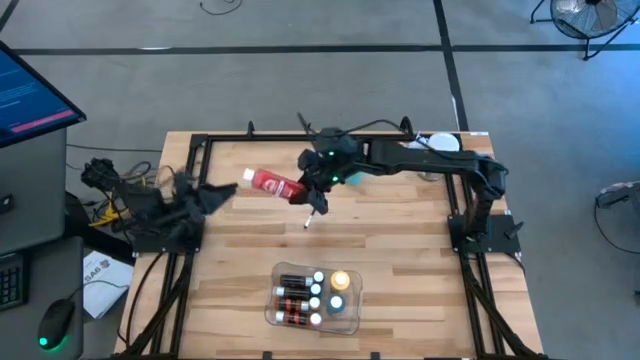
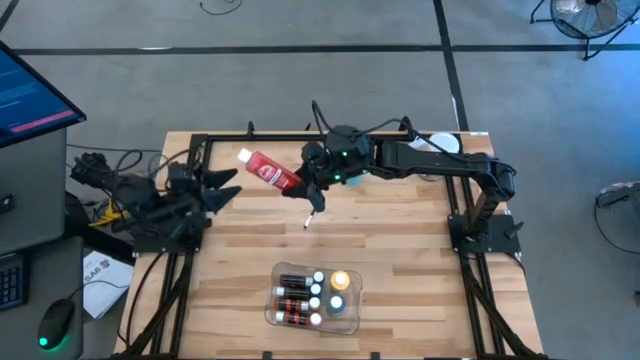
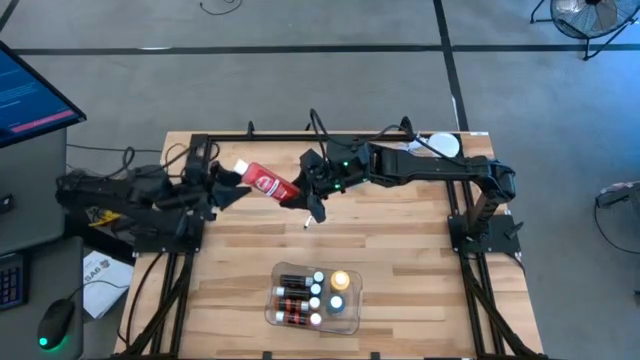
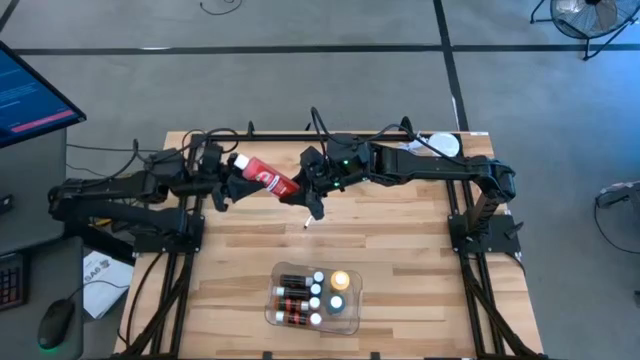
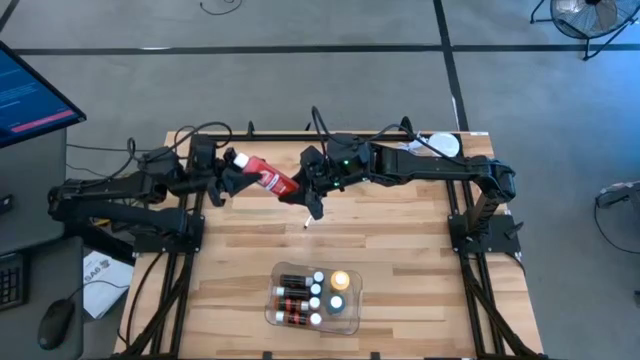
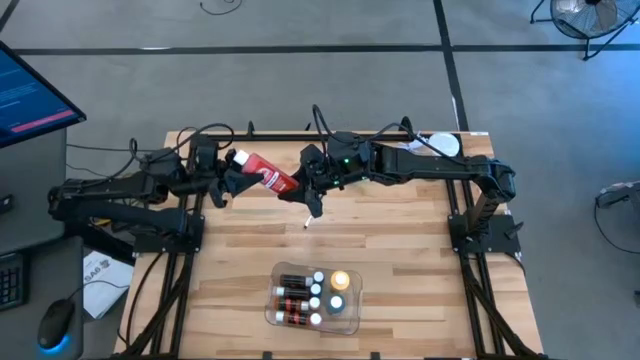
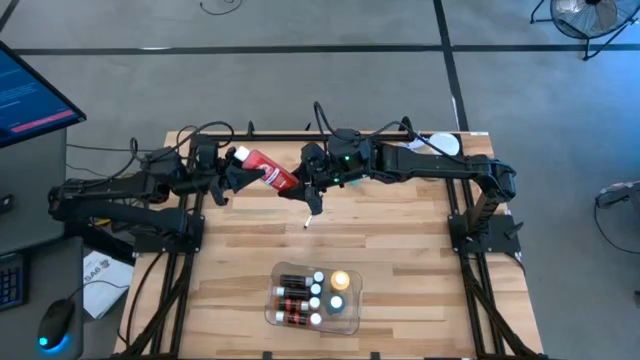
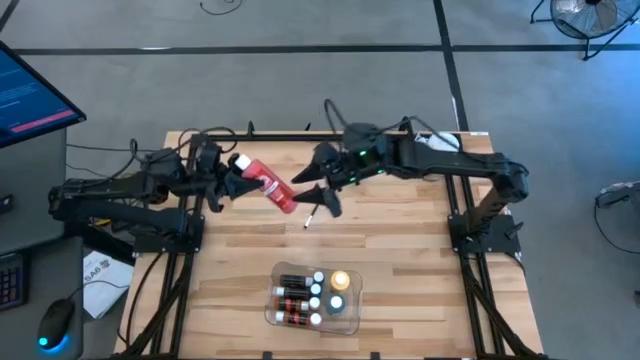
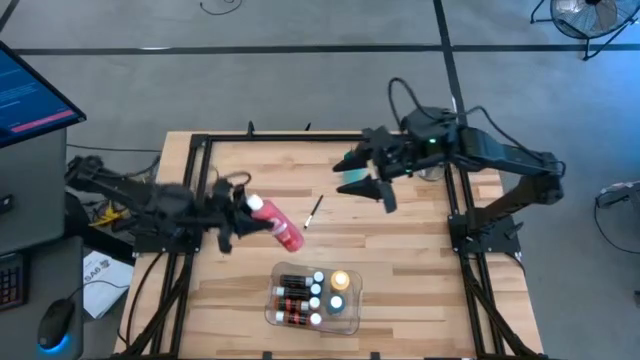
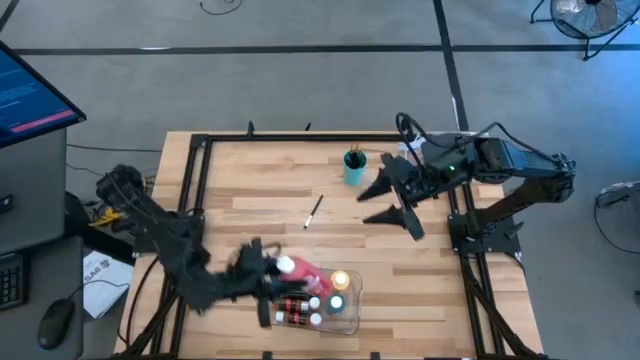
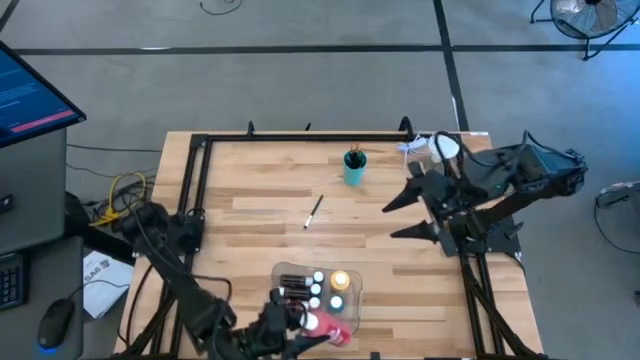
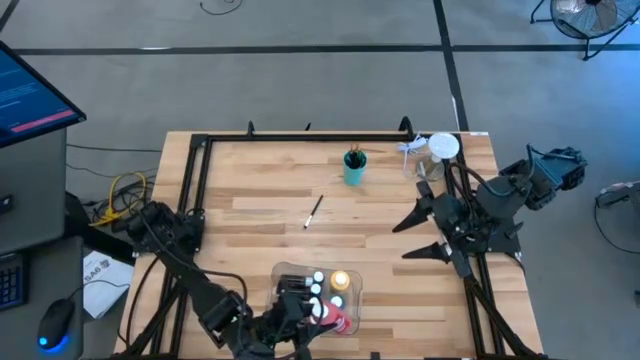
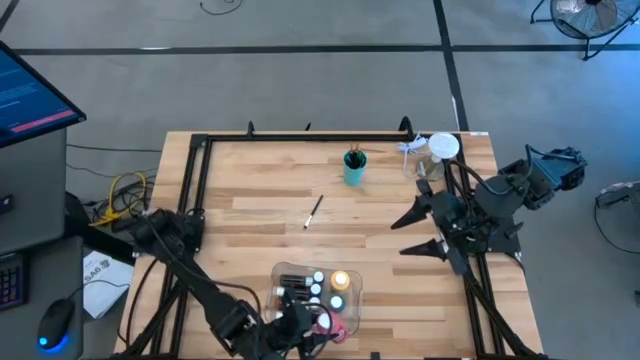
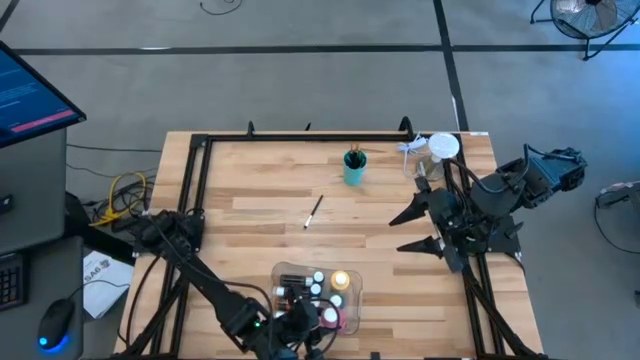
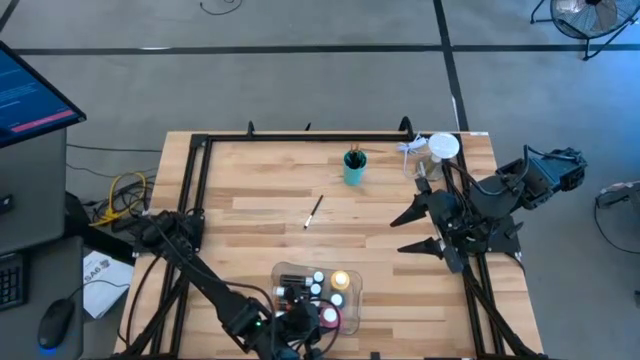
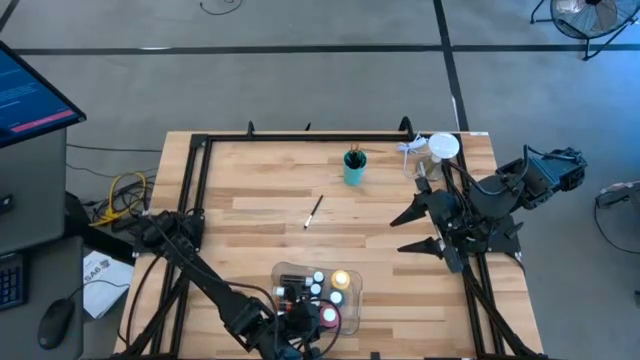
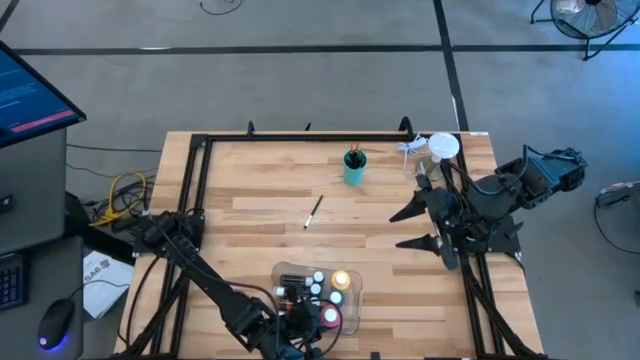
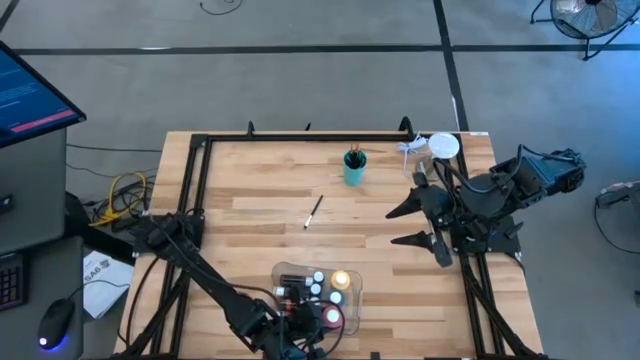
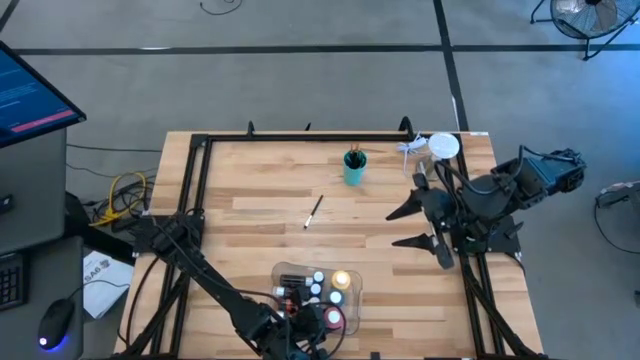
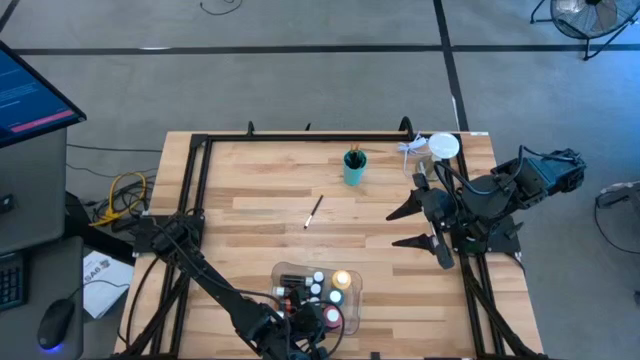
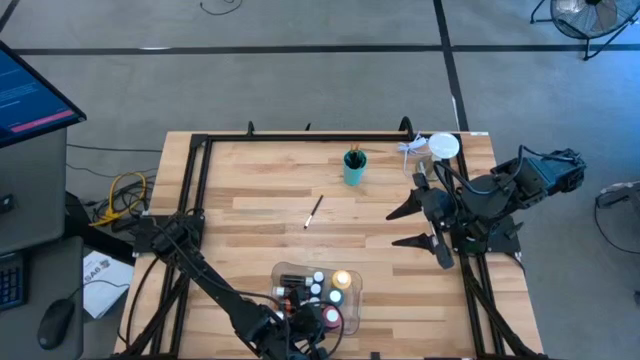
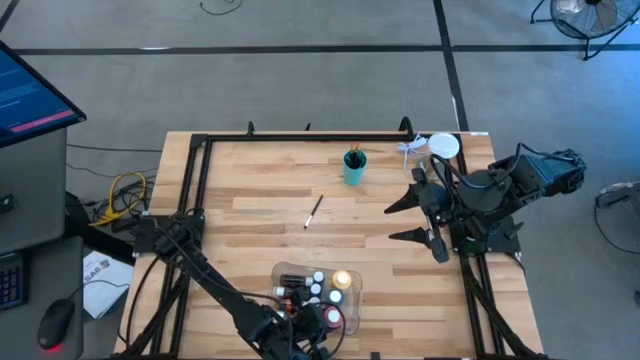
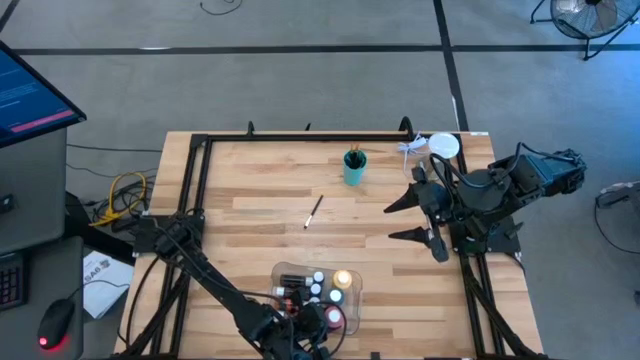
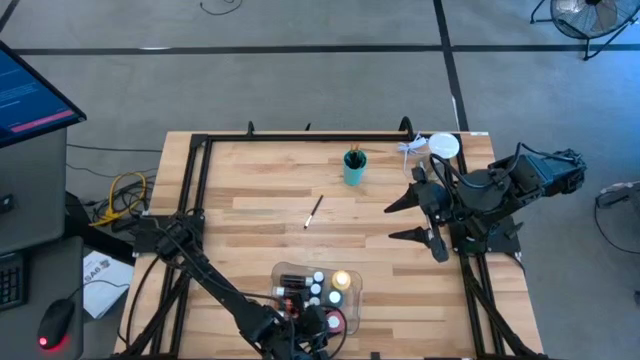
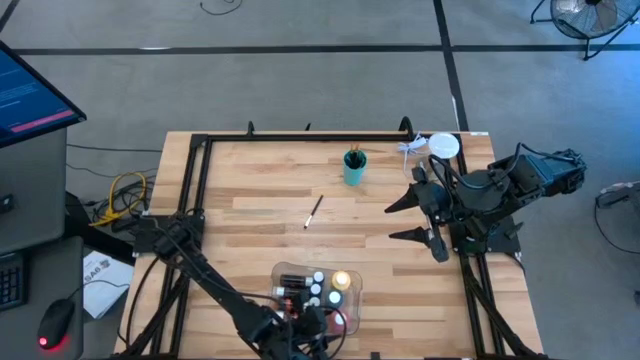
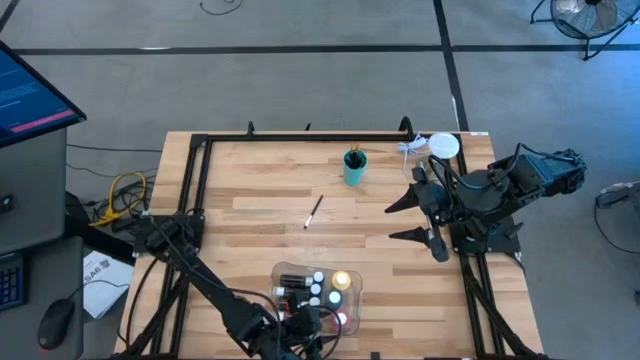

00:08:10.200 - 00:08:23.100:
Task: Pick & Place Paint Supplies
Put the red paint bottle into the transparent bin

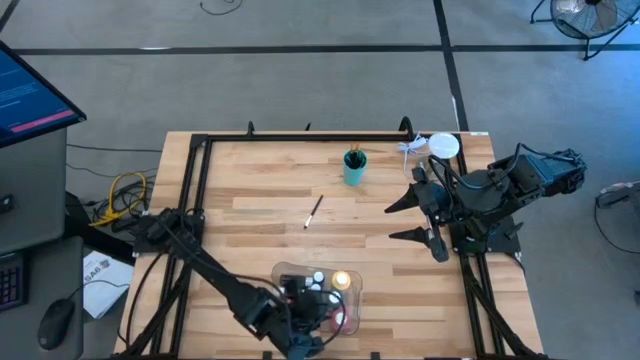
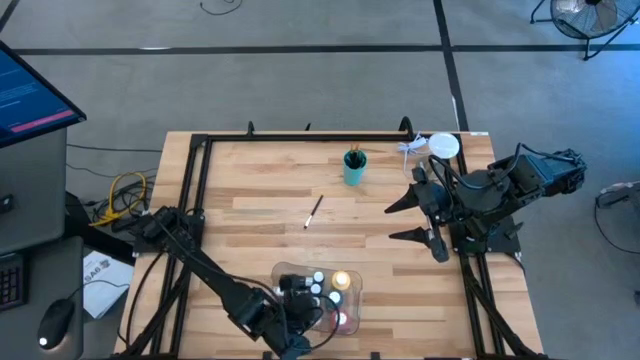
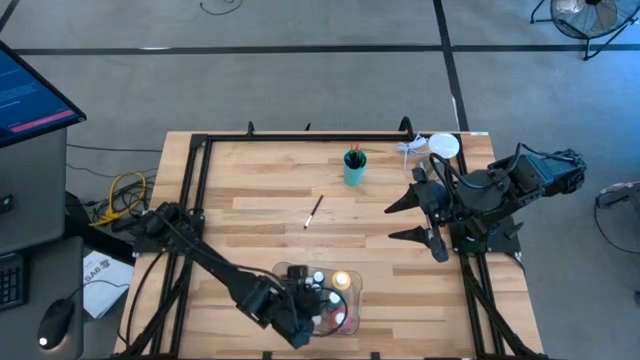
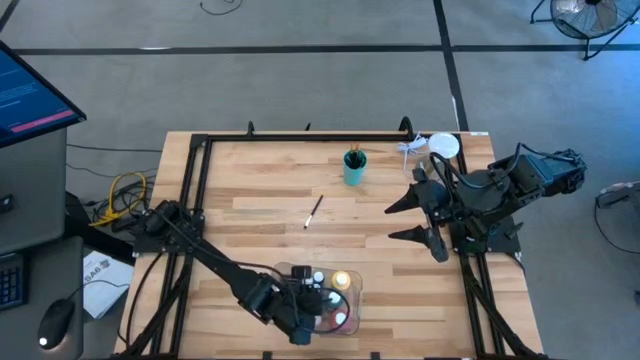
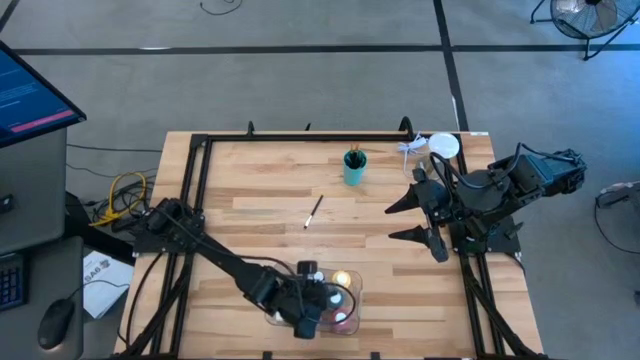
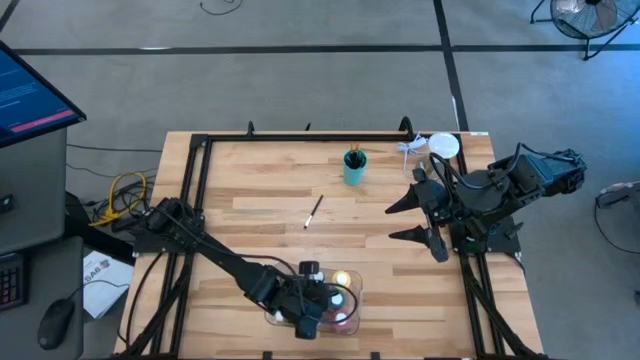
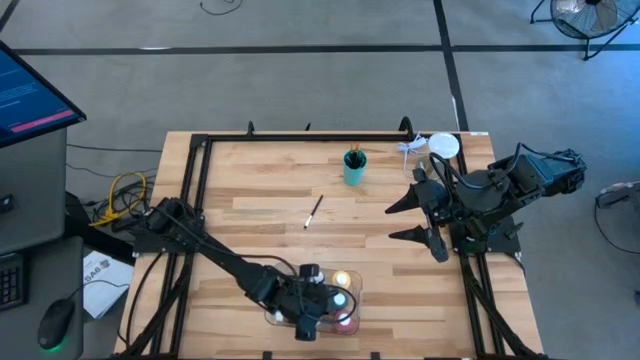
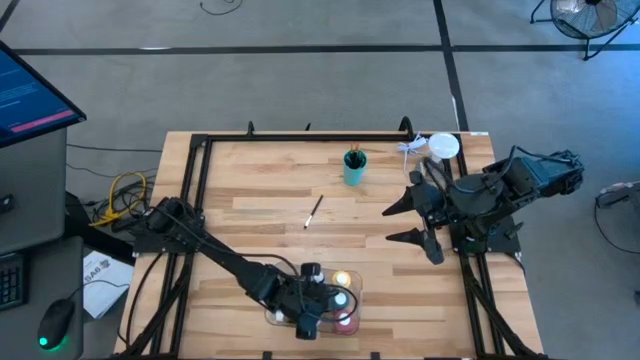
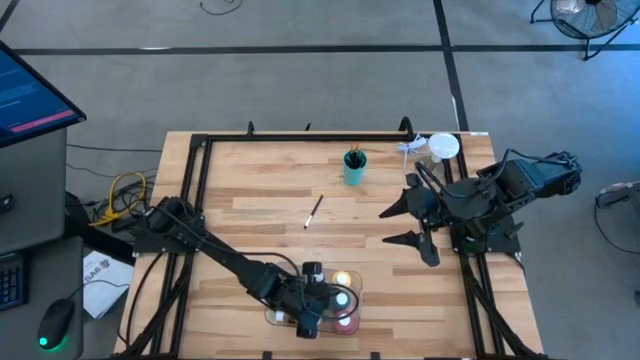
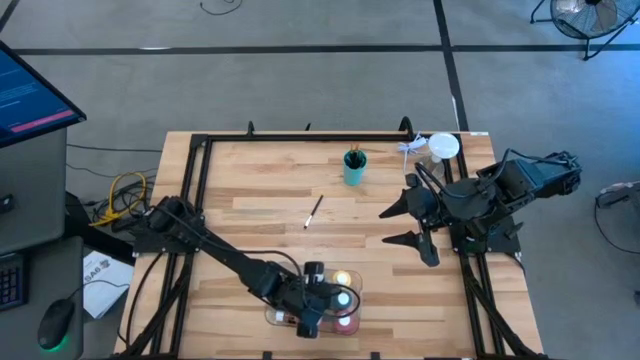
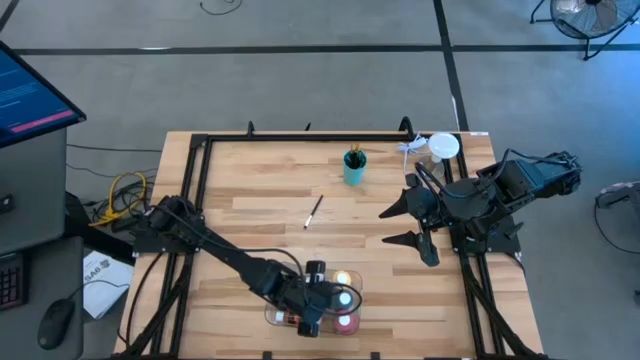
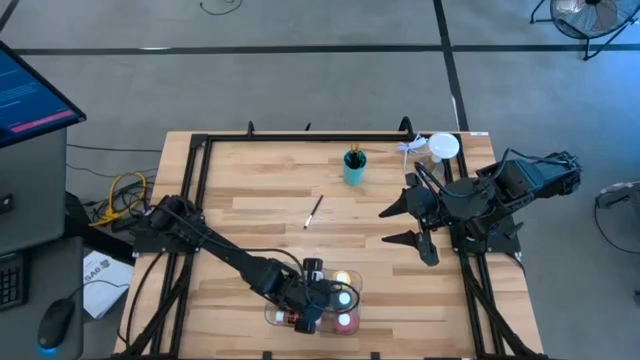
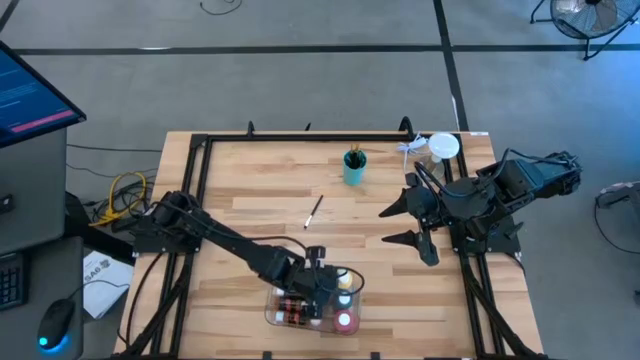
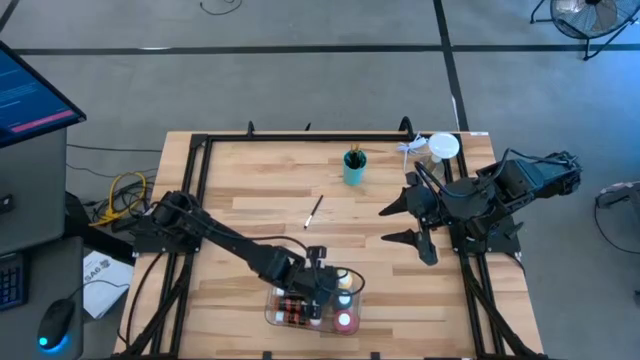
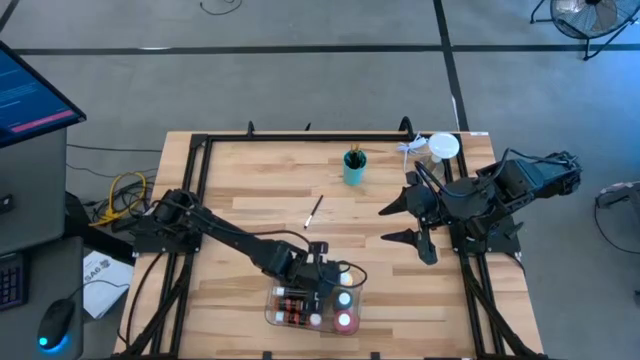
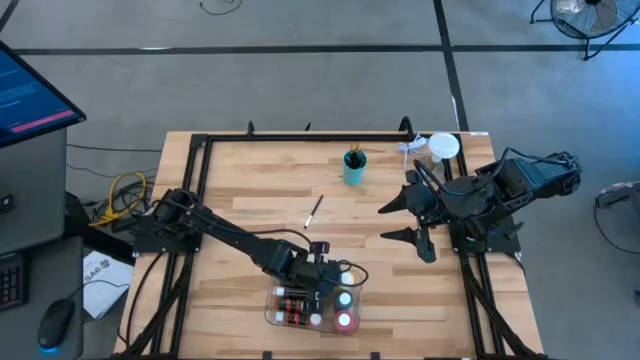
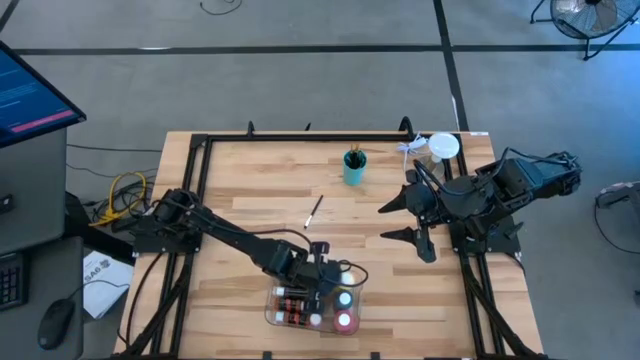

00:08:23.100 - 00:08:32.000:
Adjust the paint bottles
